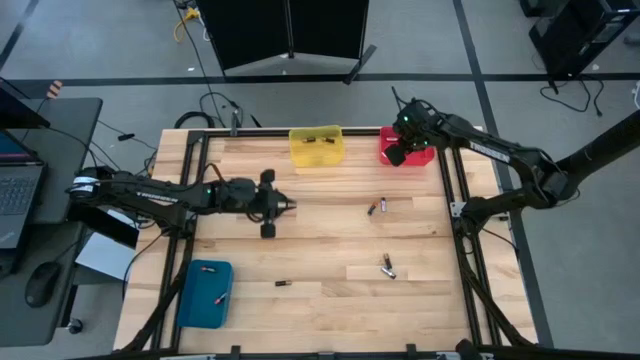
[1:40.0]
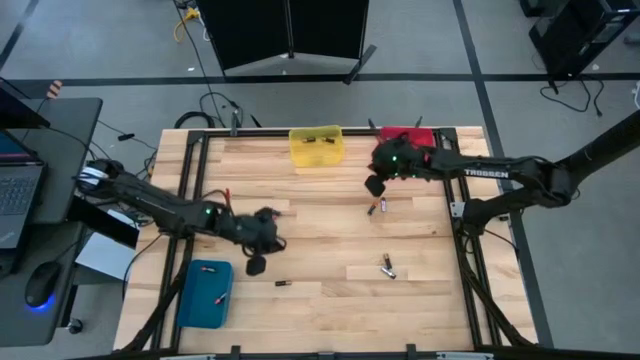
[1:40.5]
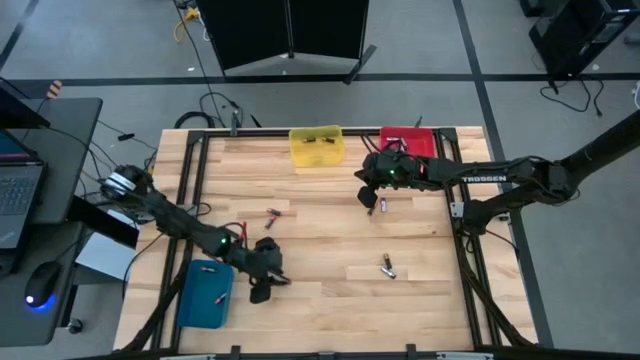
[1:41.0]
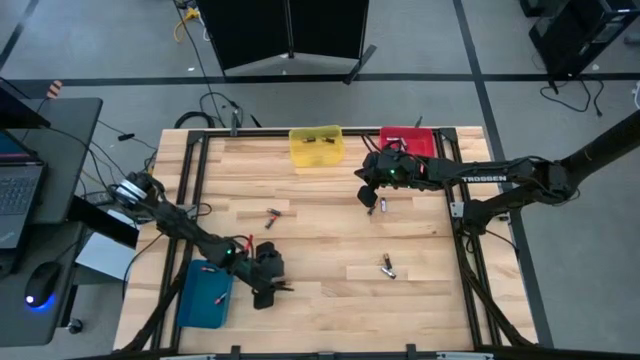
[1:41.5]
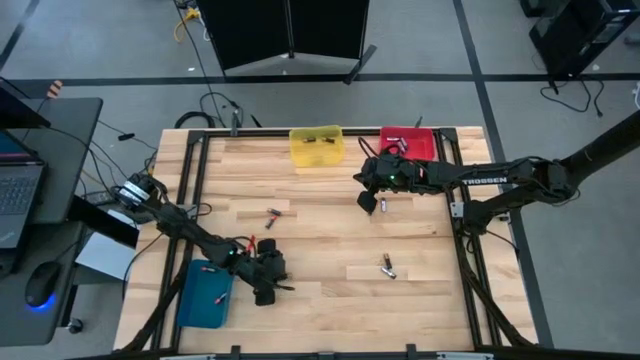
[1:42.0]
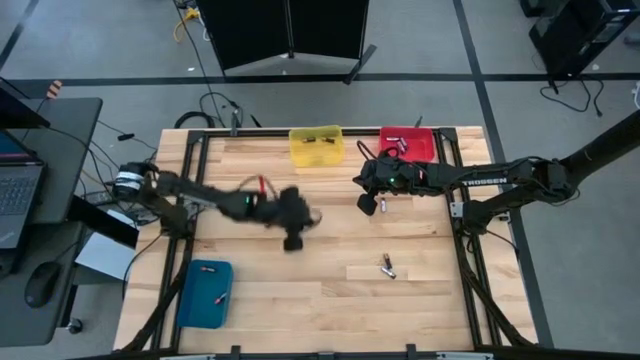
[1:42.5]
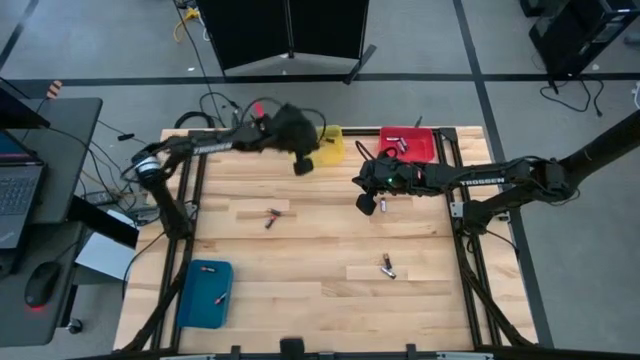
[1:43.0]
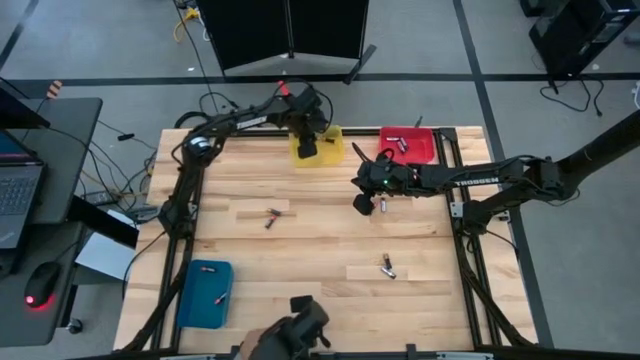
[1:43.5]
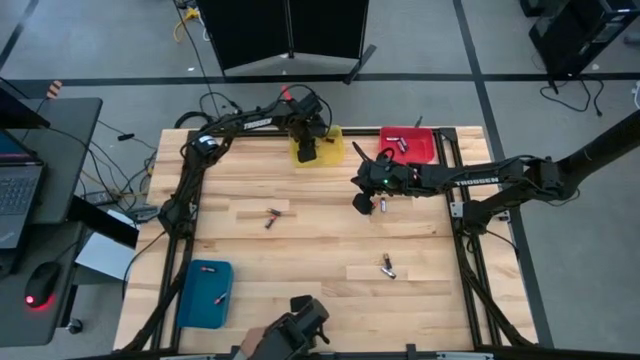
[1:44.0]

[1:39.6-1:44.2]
Task: Sort batteries
Put the black-brown battery into the yellow bin

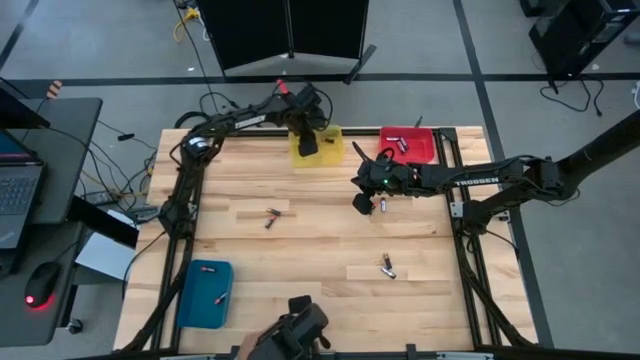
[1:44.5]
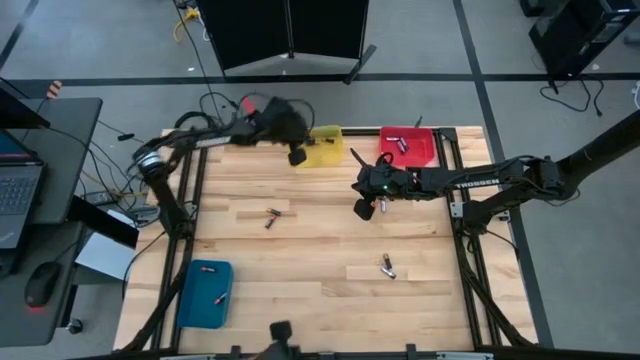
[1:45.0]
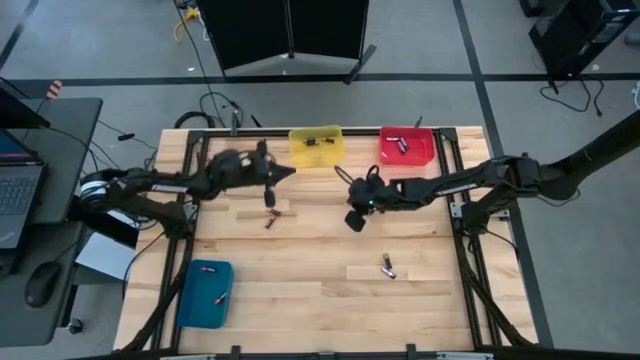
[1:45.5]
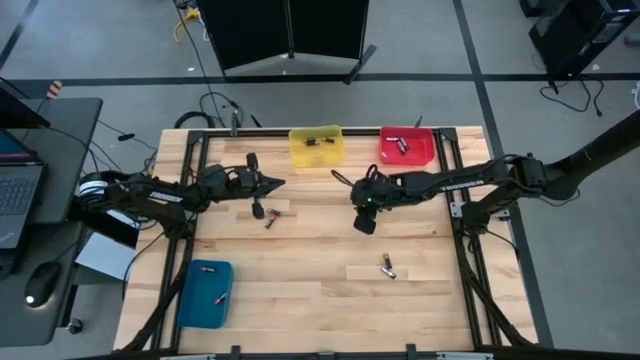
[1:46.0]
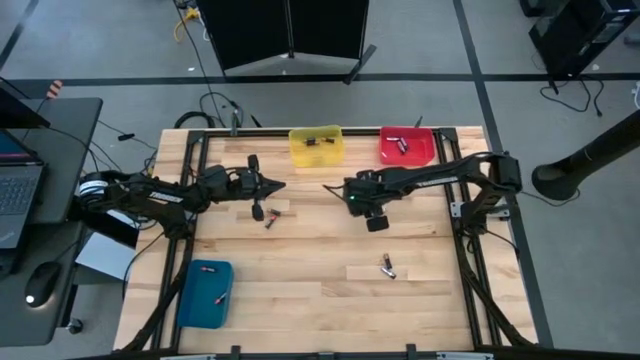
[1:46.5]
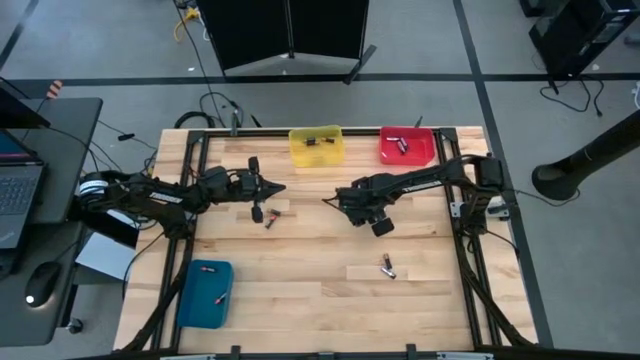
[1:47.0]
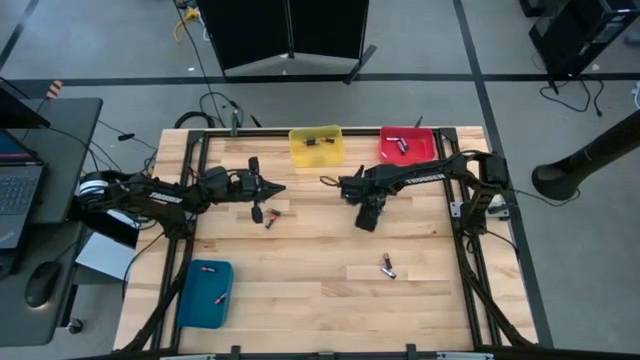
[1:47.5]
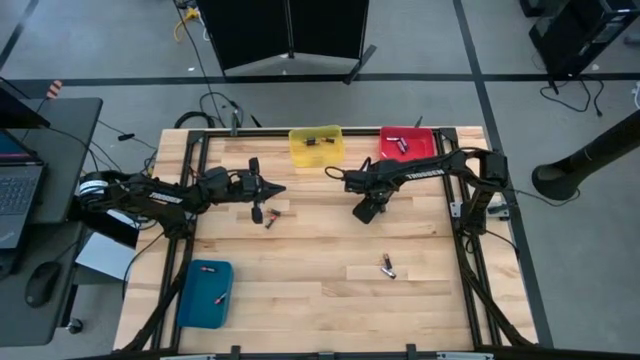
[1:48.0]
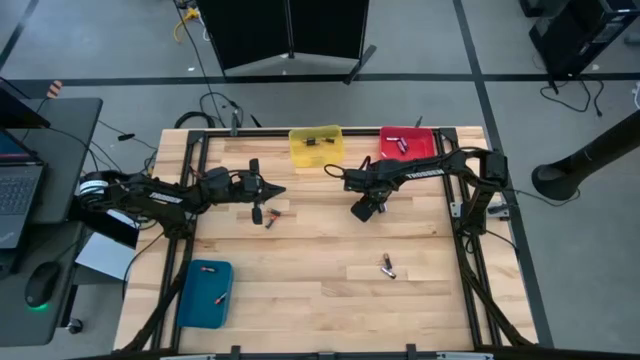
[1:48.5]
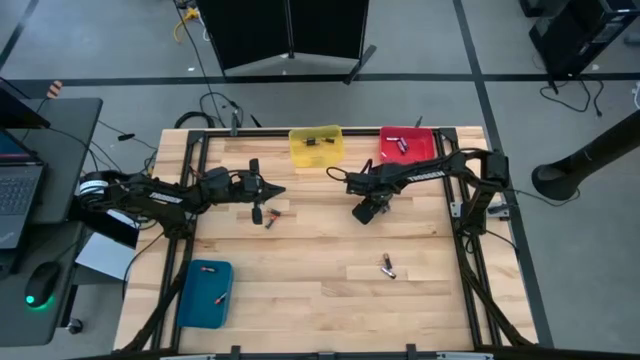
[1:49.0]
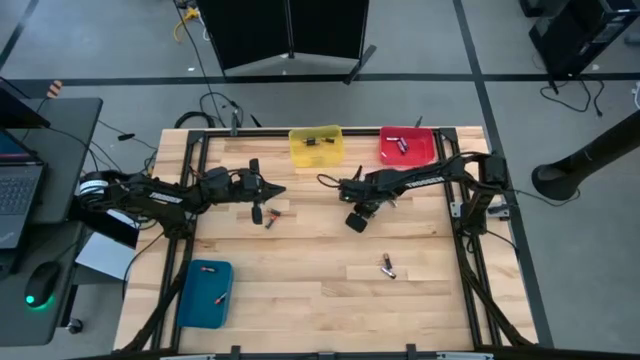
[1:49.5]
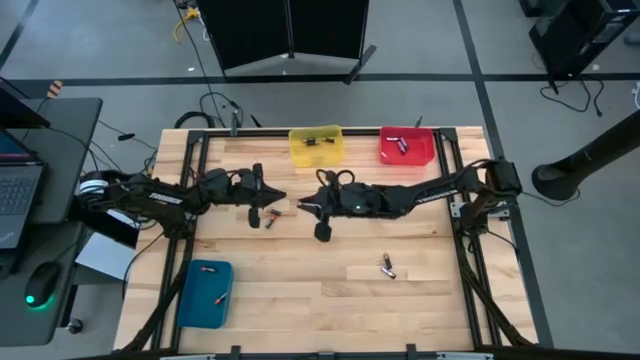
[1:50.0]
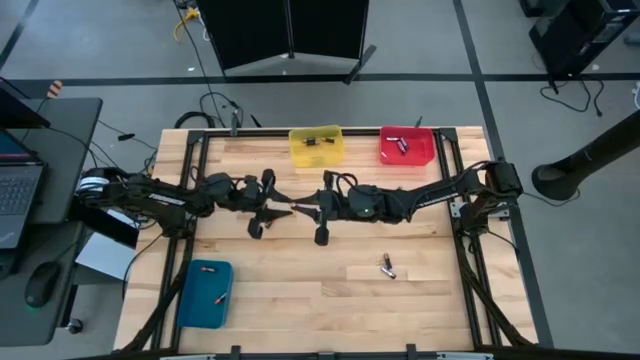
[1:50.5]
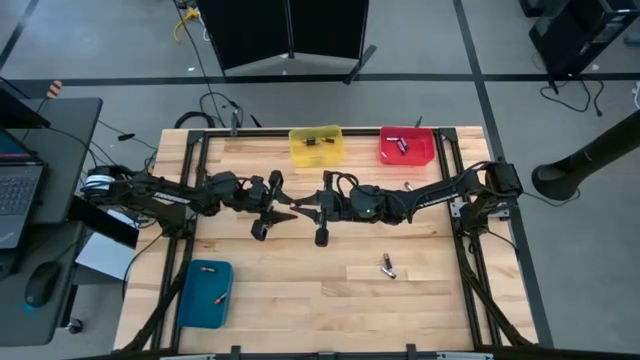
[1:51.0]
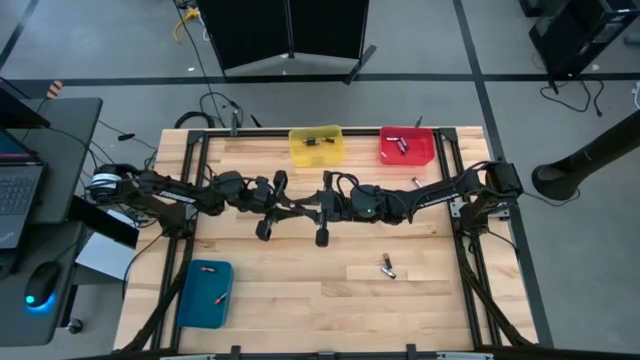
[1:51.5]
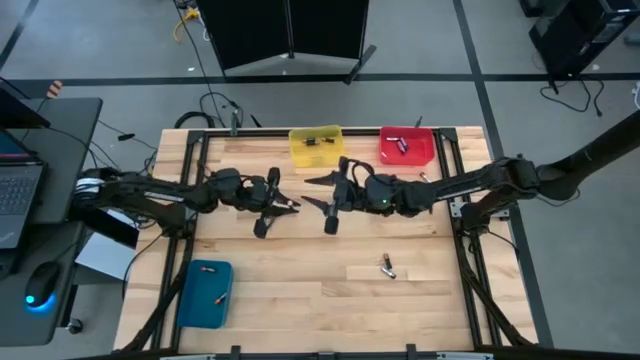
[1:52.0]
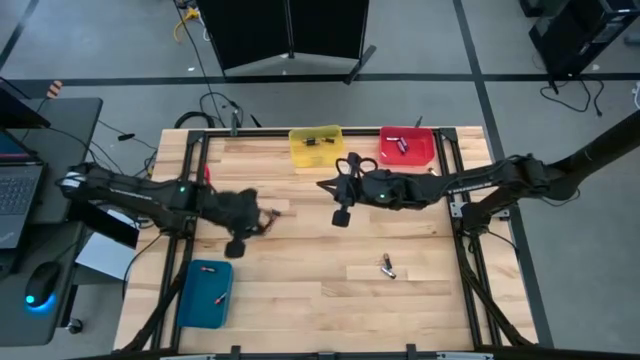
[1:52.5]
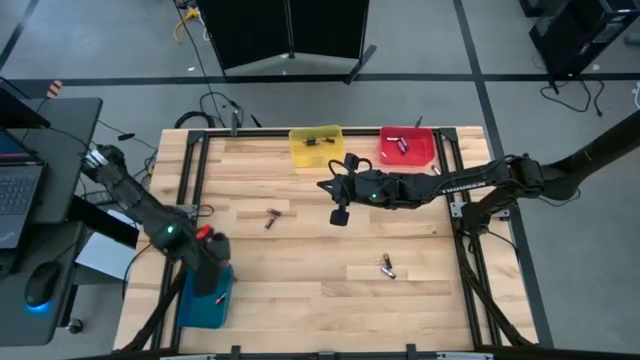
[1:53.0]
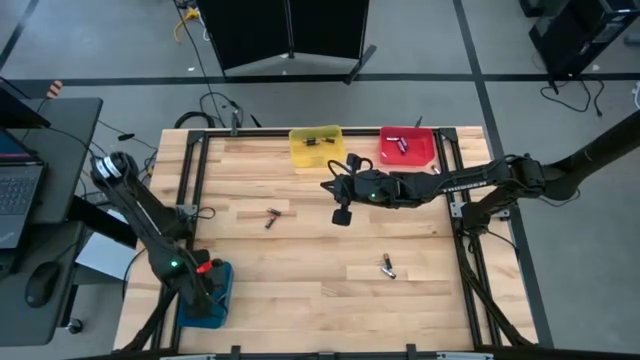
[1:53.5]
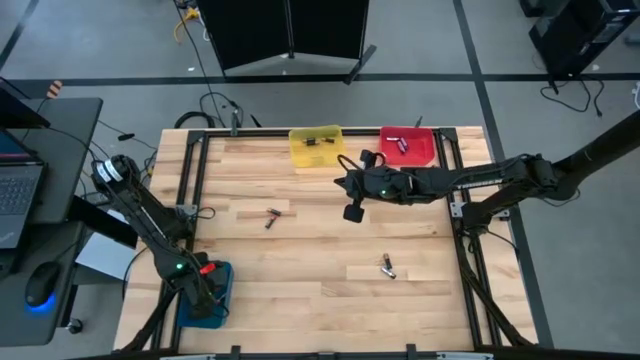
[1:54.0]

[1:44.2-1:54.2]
Put the black-red battery into the blue bin

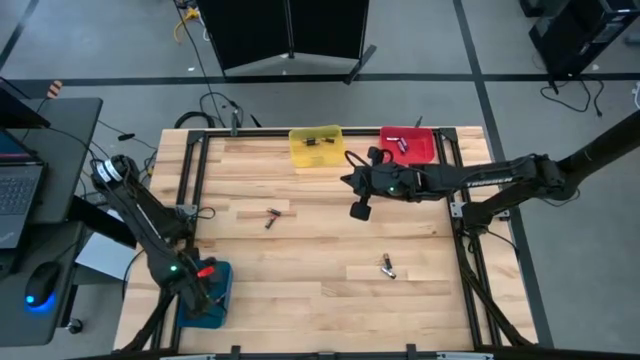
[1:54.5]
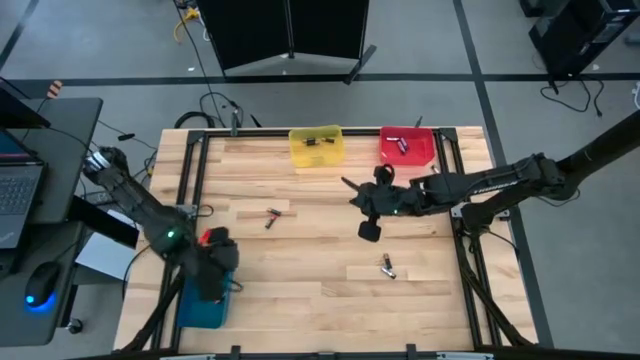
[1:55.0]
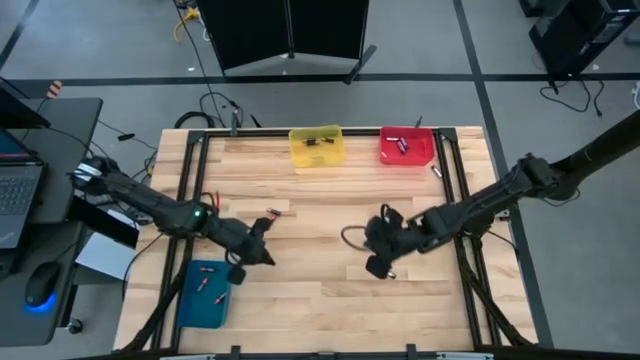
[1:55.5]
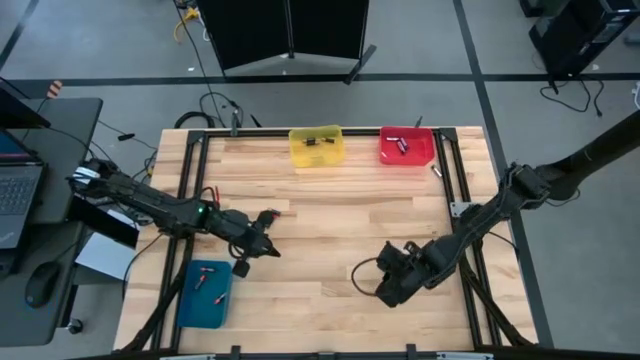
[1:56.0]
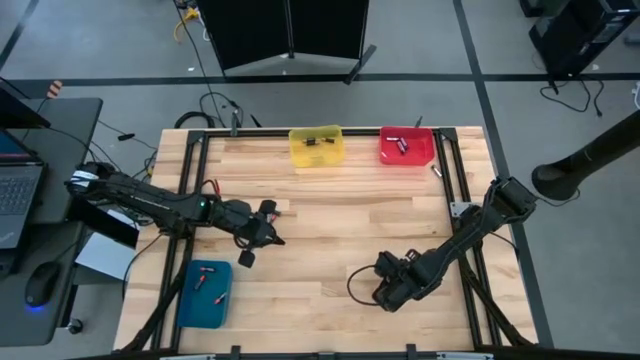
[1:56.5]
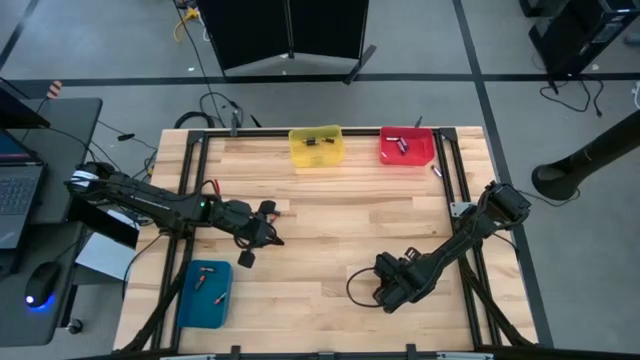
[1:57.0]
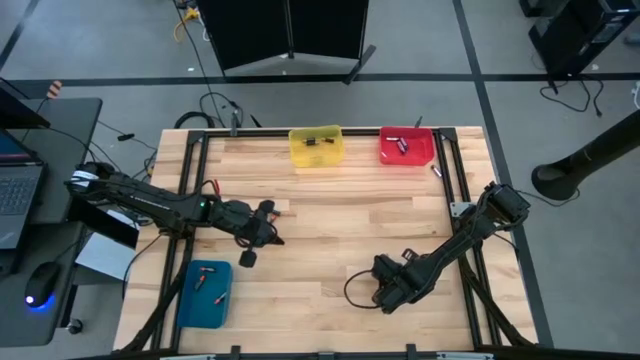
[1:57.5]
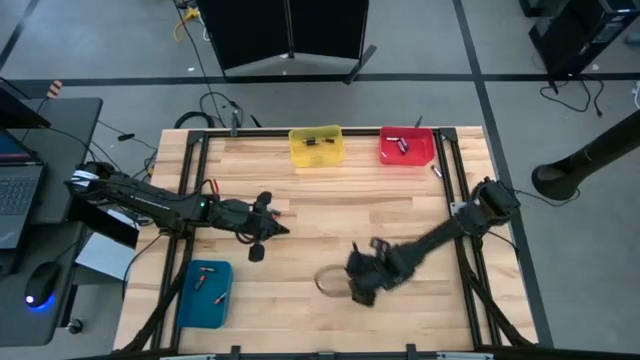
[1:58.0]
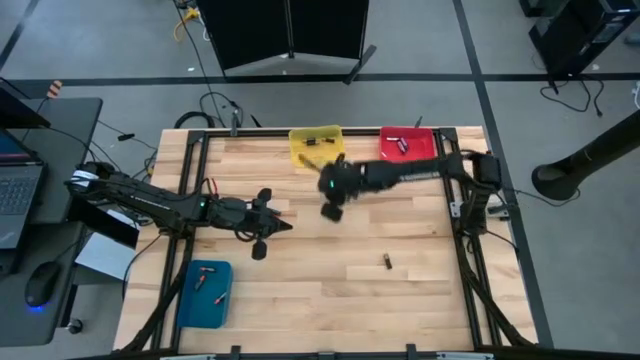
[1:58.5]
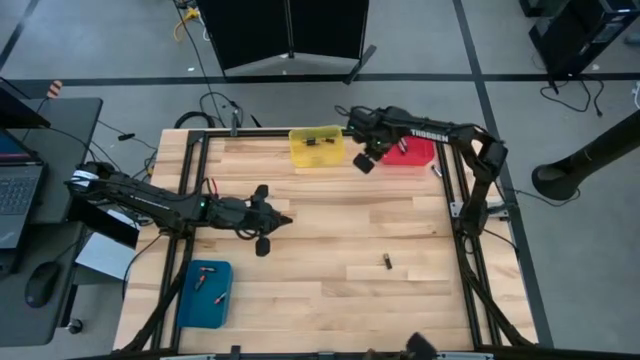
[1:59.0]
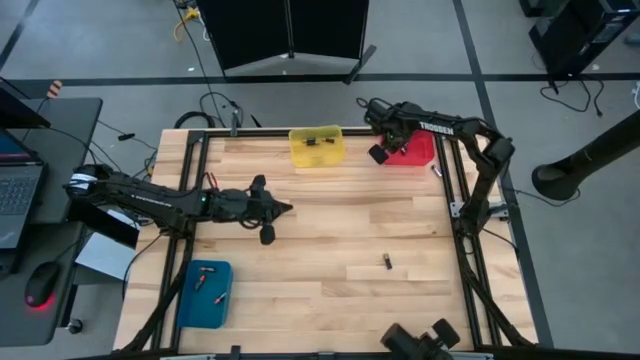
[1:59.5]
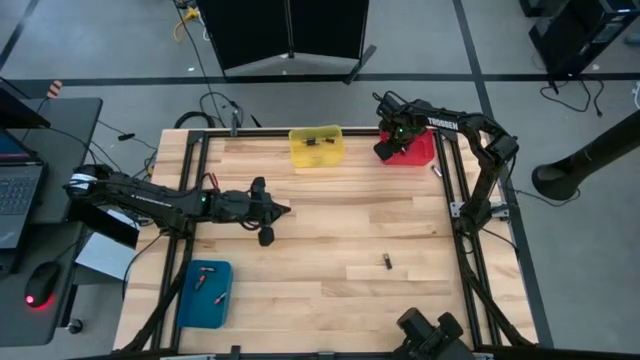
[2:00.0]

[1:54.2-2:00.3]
Put the silver battery into the red bin

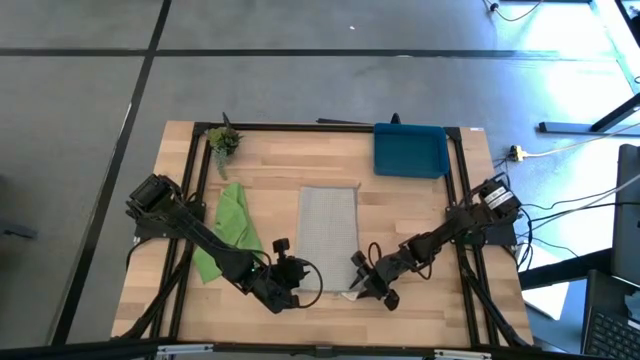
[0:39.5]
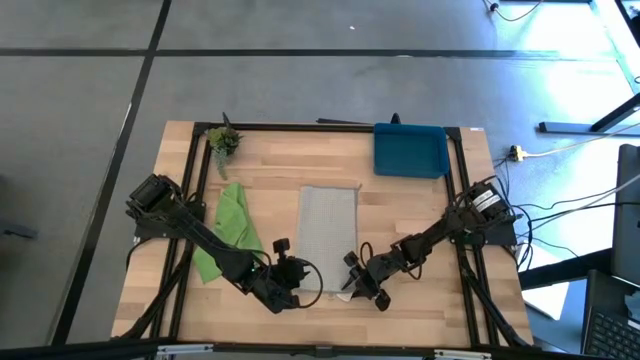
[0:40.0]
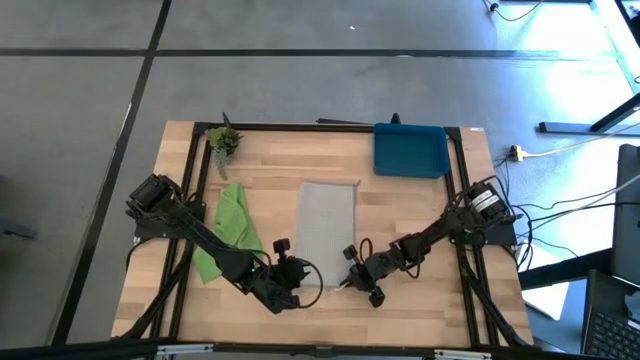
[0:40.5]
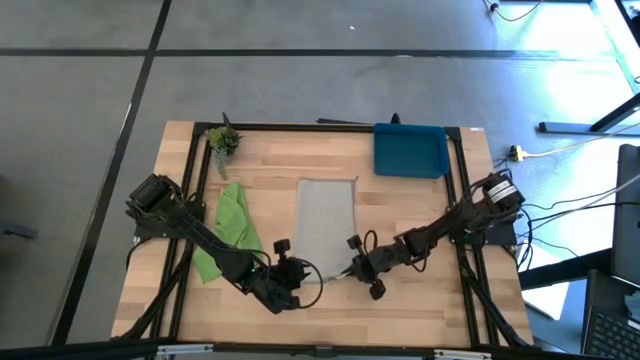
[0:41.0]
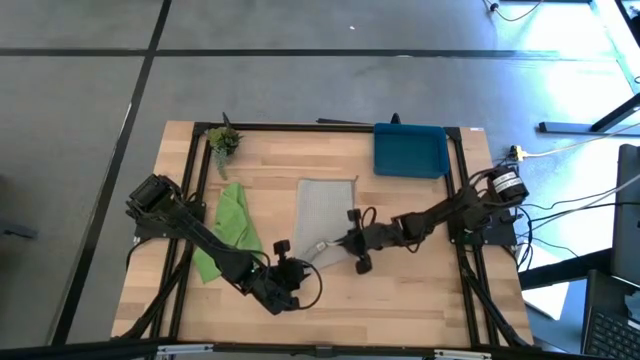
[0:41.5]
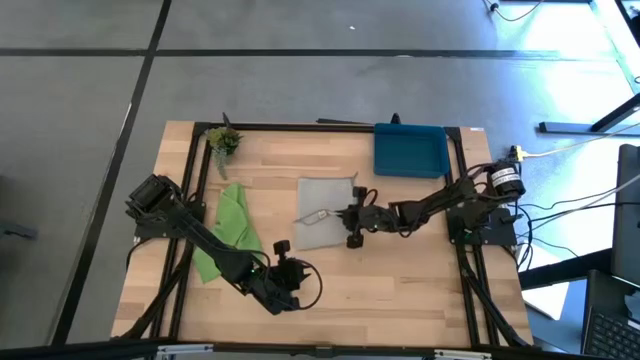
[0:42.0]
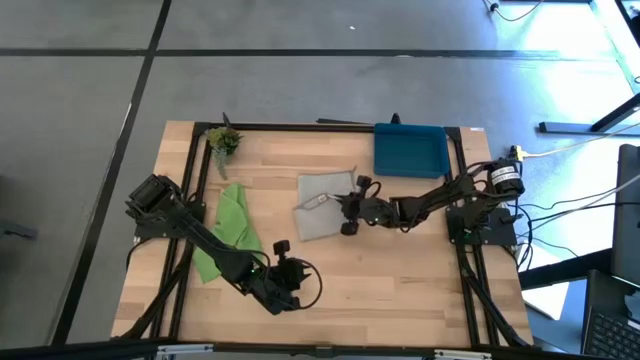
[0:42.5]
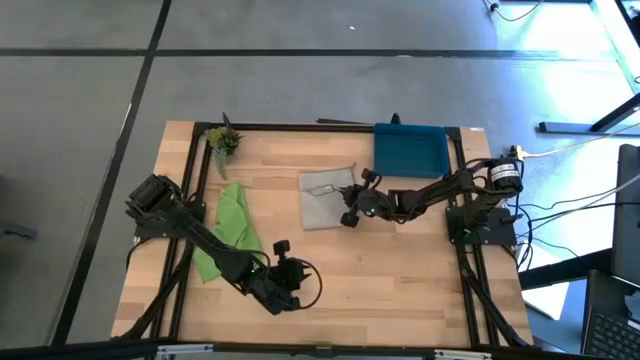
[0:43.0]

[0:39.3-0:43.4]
Task: Roll microfiber towels into tight, uniform cylinder then place into a basket
Fold the gray microfiber cloth
